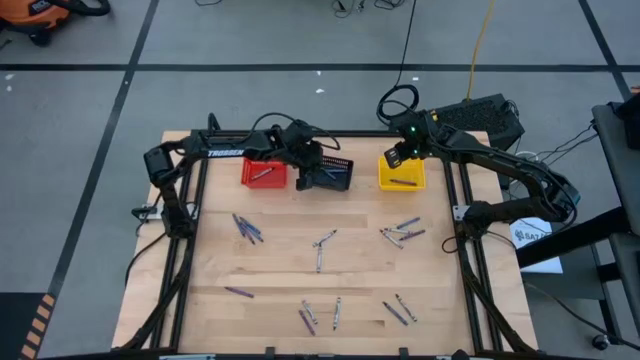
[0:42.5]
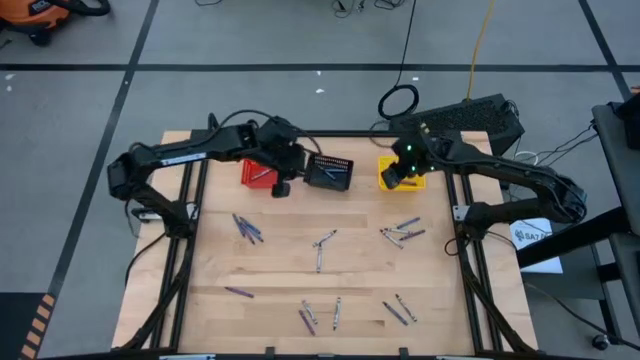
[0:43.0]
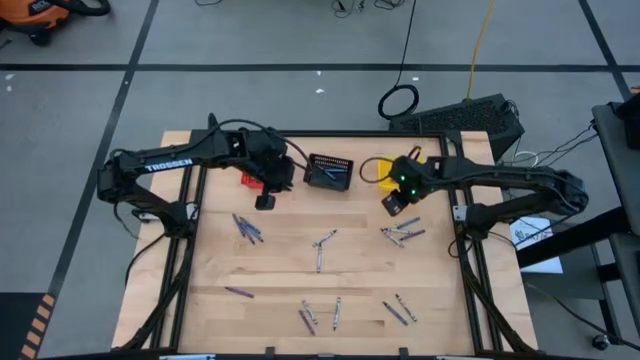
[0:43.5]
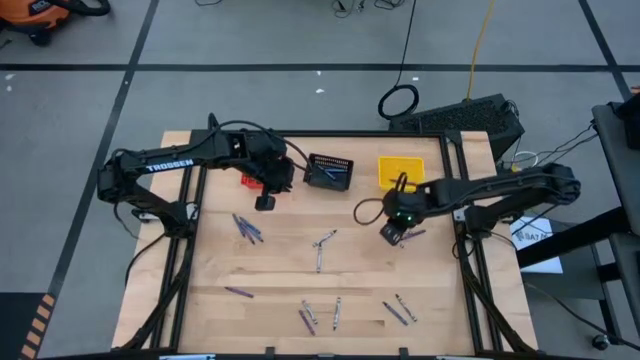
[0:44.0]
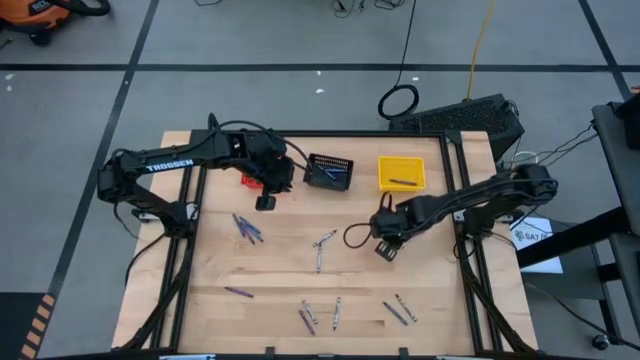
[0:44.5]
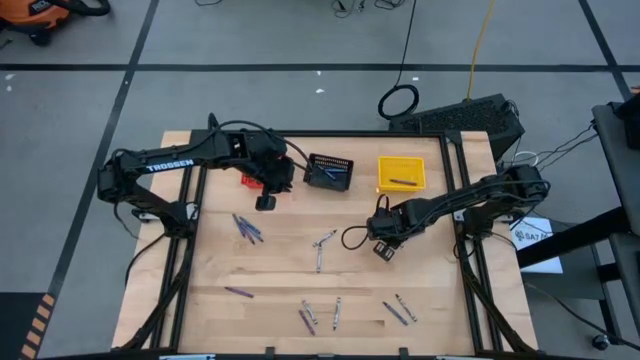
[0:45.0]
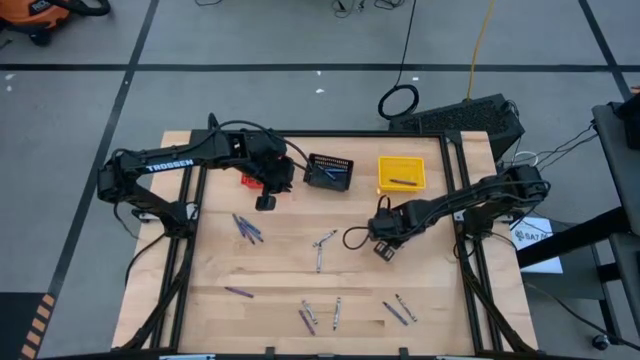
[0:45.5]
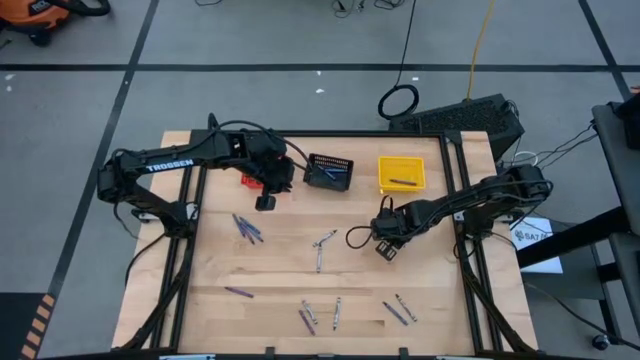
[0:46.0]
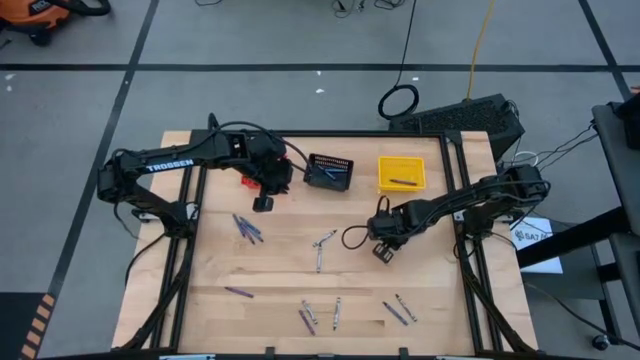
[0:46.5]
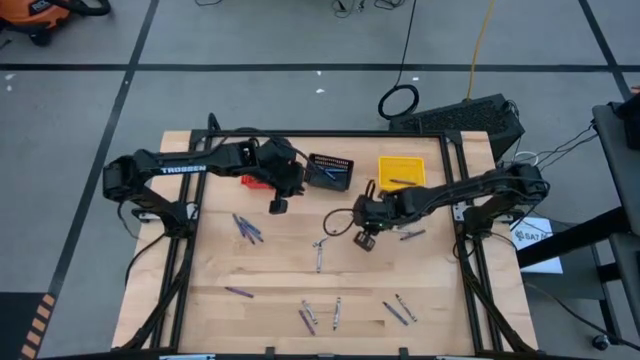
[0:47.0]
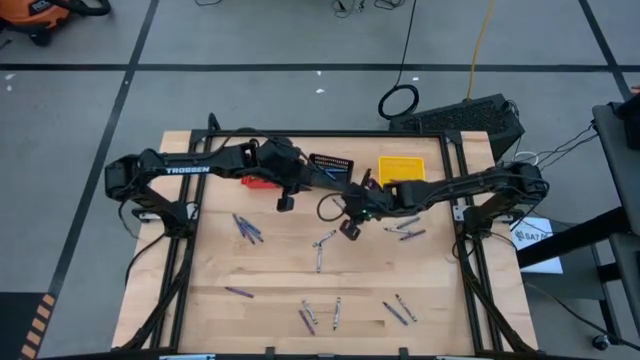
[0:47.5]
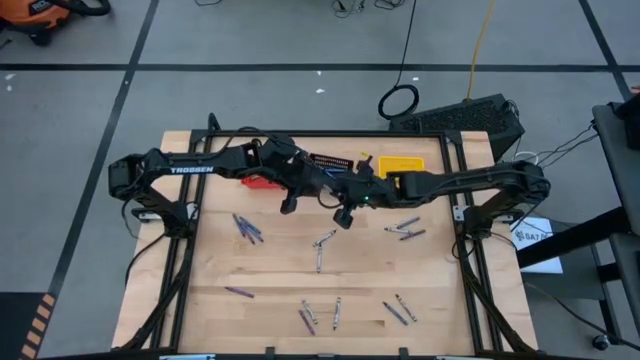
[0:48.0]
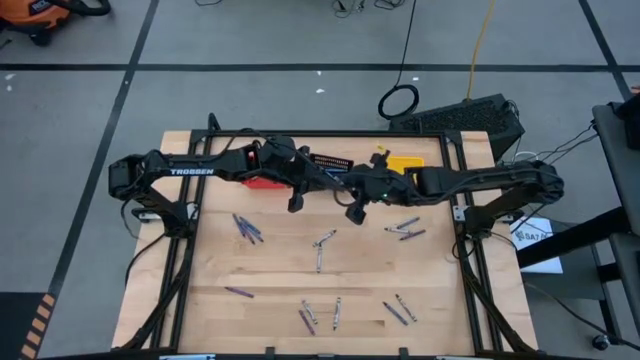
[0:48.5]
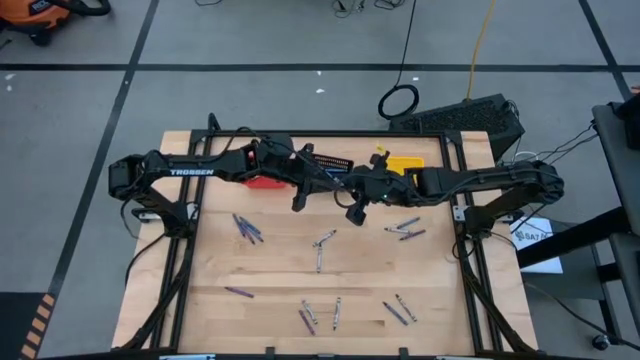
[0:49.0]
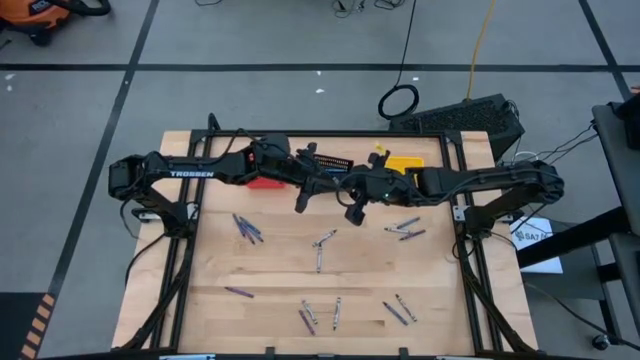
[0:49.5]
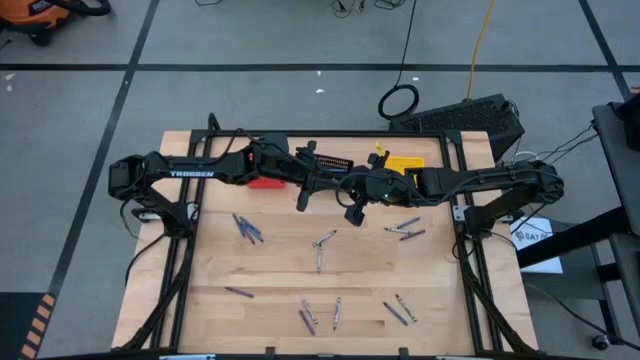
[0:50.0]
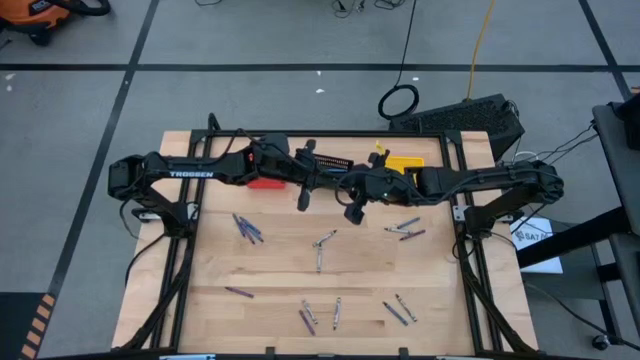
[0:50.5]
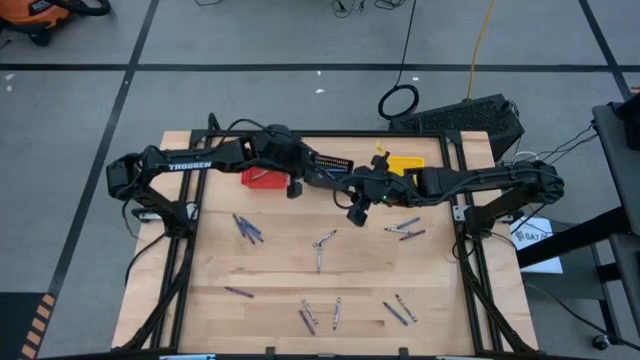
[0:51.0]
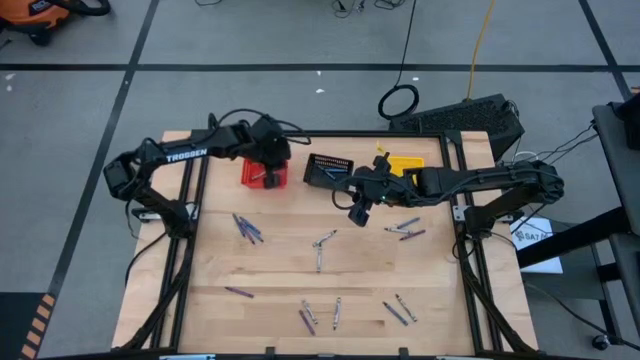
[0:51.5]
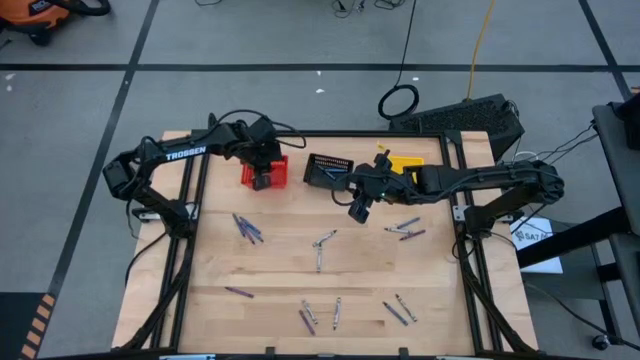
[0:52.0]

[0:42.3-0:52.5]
Task: Sort crayons
Put the gray crayon into the red bin

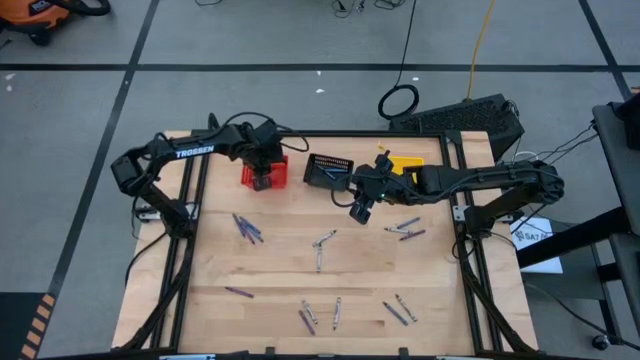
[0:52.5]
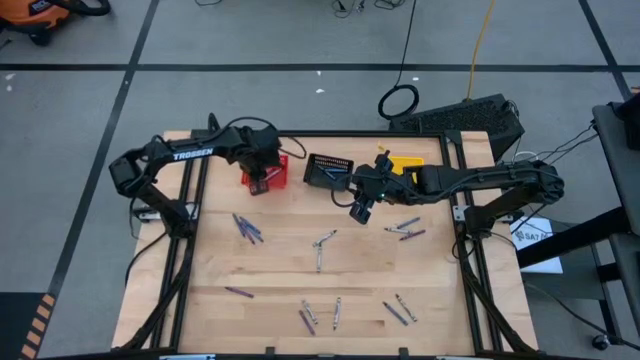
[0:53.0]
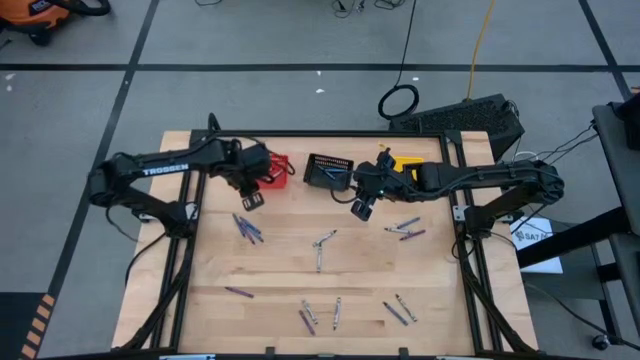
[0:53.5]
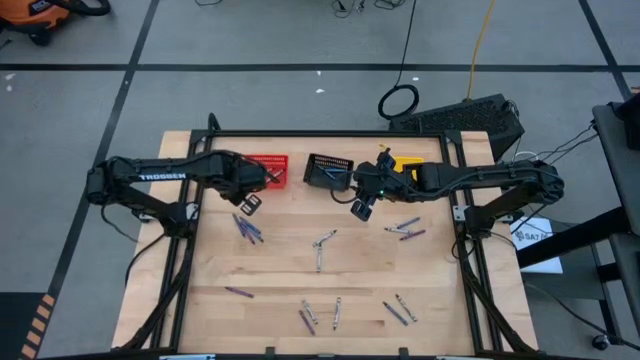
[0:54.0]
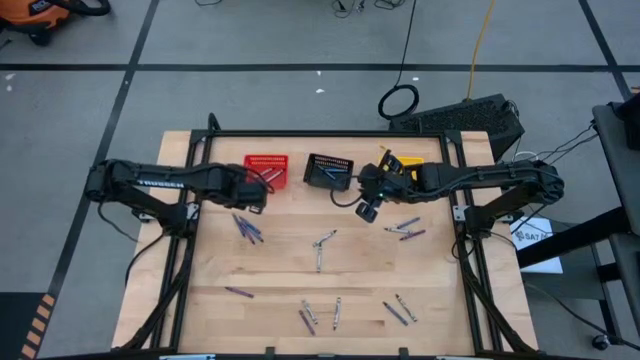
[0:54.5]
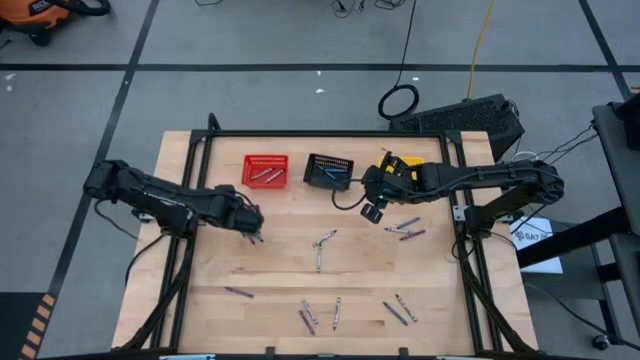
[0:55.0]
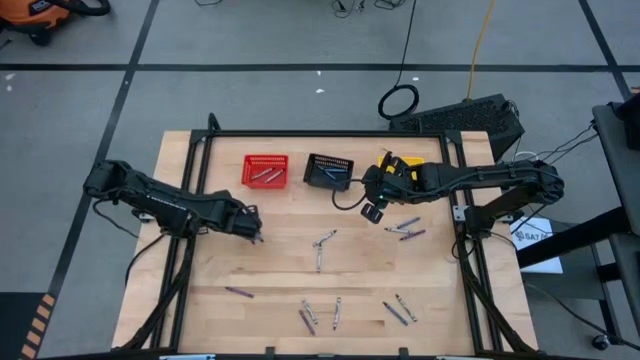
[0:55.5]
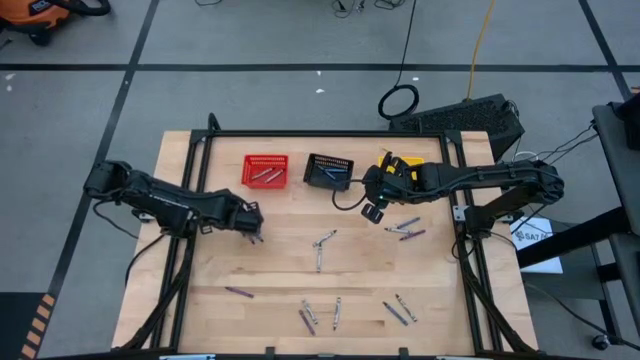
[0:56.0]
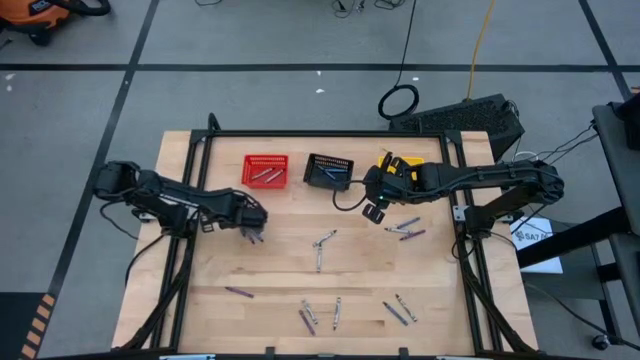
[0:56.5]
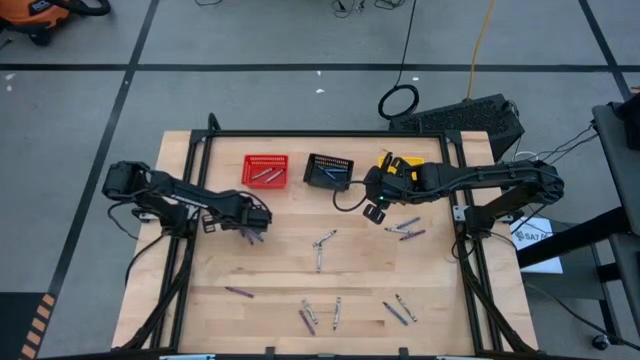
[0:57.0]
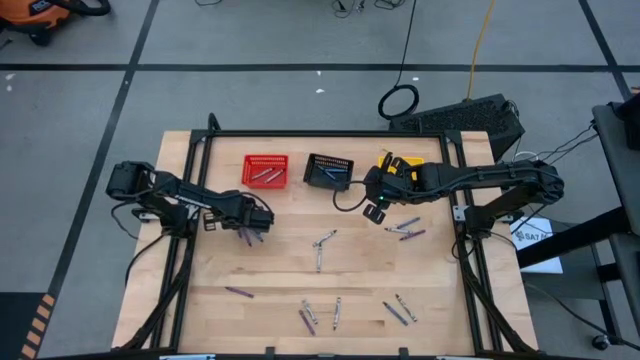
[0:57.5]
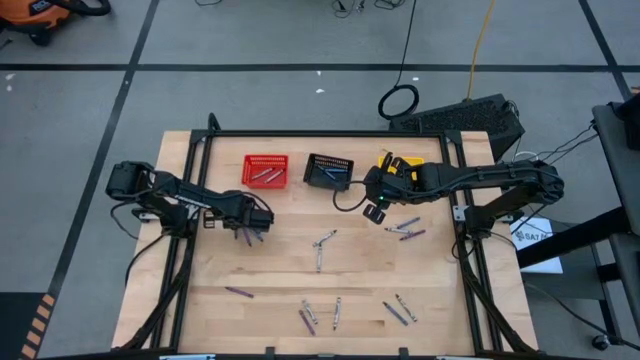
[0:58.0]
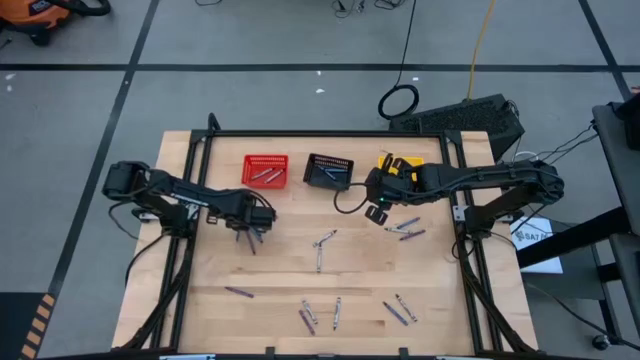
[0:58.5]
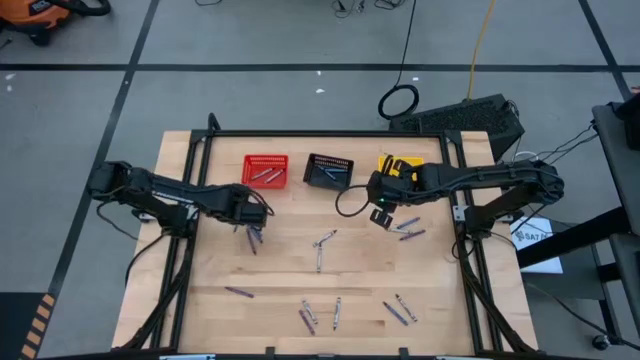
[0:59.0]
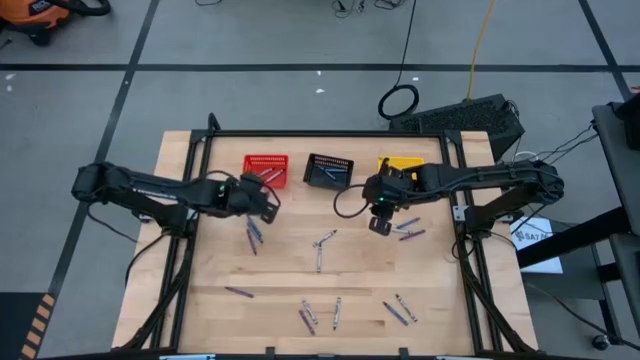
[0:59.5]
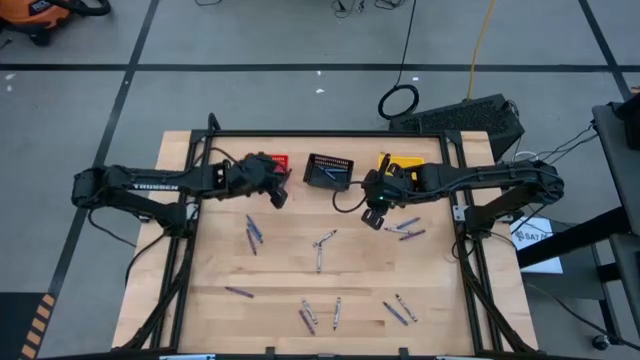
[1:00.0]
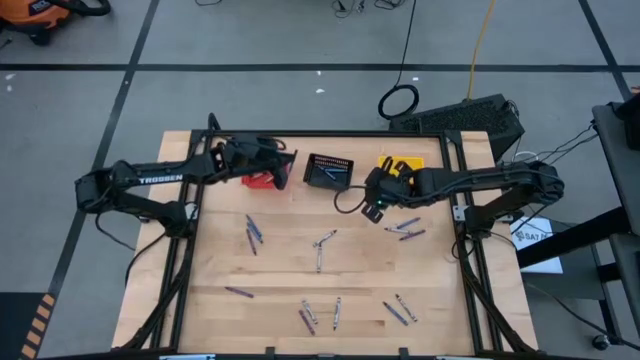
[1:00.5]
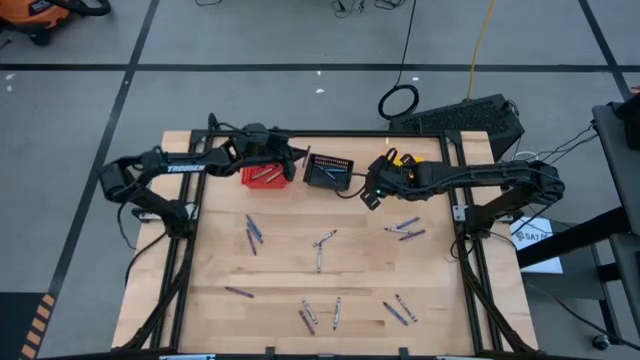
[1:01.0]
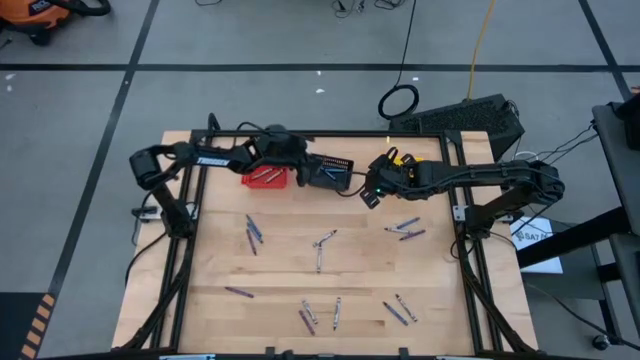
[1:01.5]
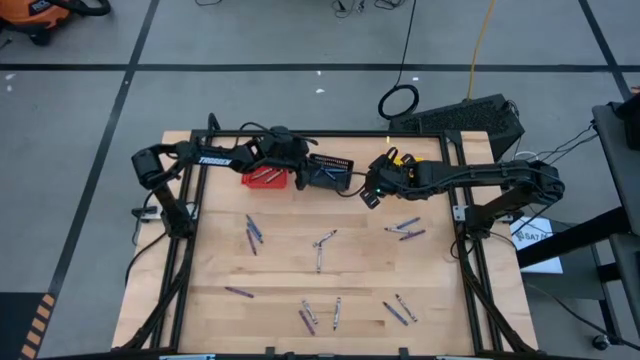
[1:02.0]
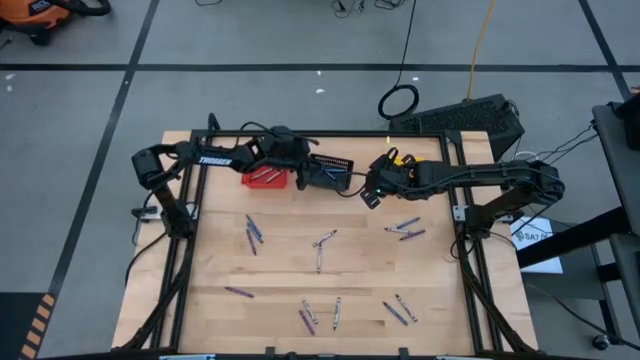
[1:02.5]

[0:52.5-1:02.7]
Put the blue crayon into the black bin

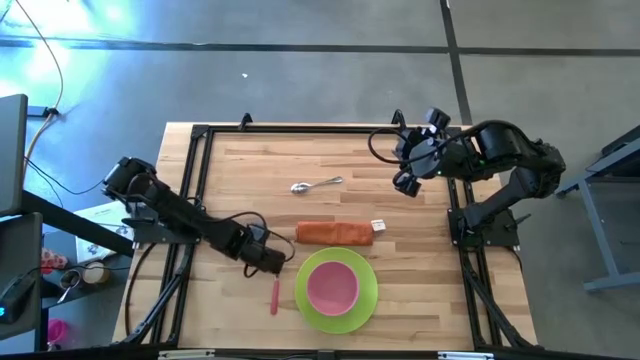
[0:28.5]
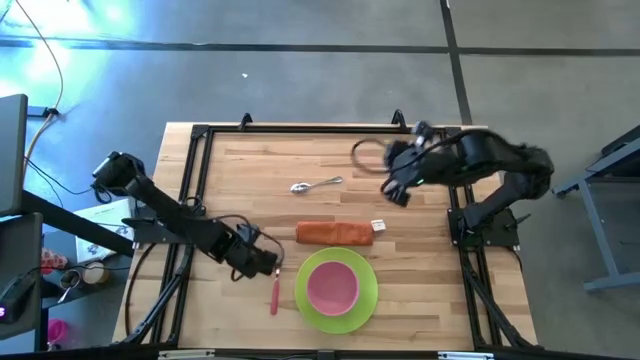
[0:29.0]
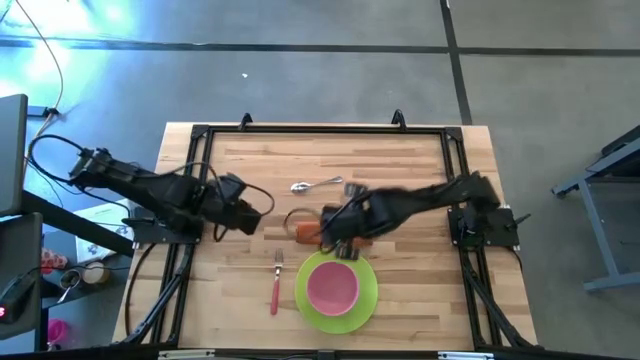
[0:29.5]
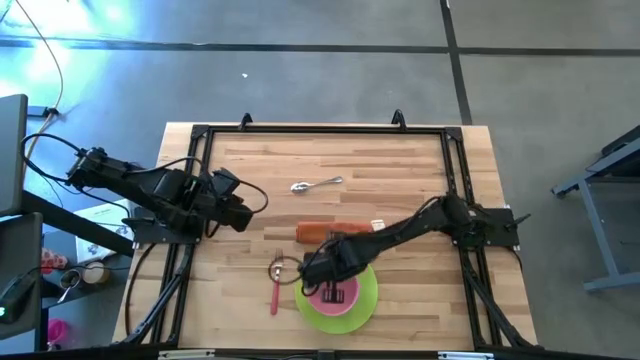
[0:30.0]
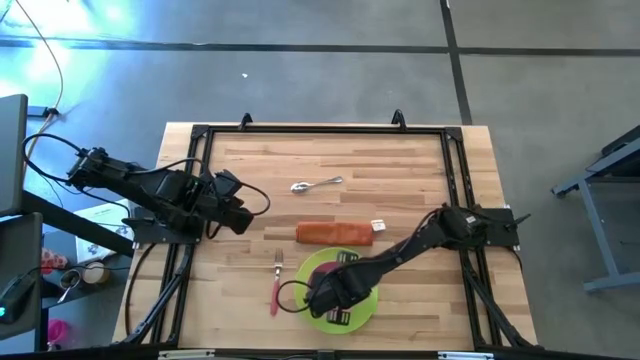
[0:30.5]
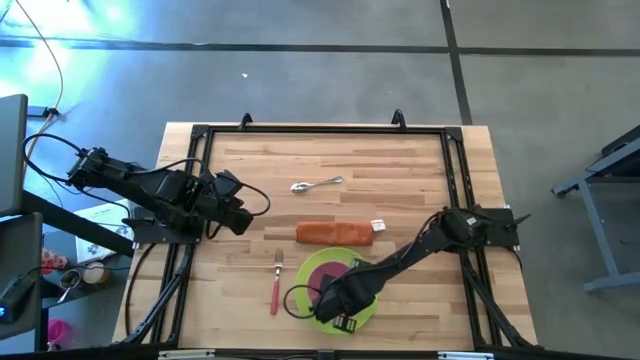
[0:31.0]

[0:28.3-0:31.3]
Task: Set table place
Adjust the pink bowl on the green plate
